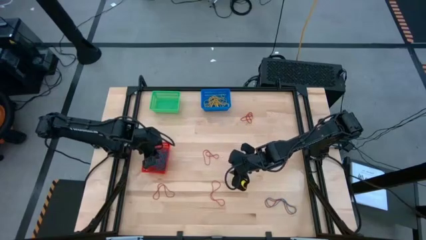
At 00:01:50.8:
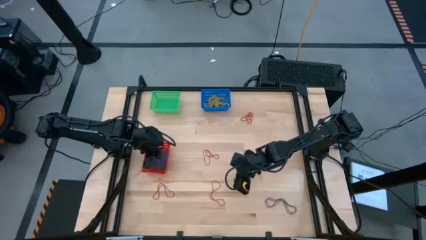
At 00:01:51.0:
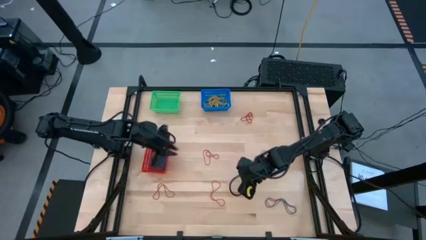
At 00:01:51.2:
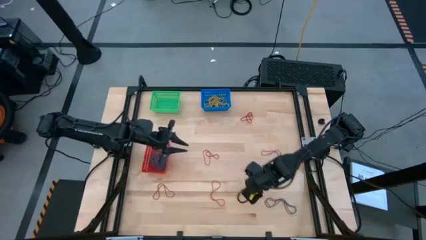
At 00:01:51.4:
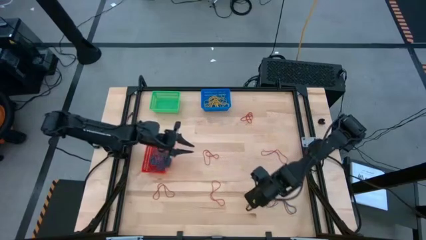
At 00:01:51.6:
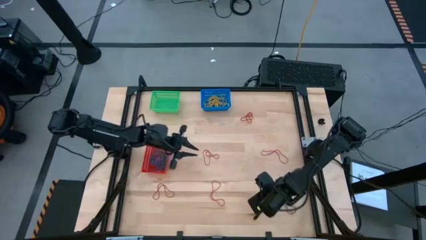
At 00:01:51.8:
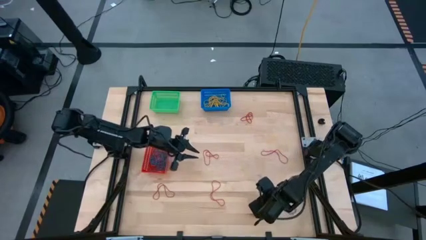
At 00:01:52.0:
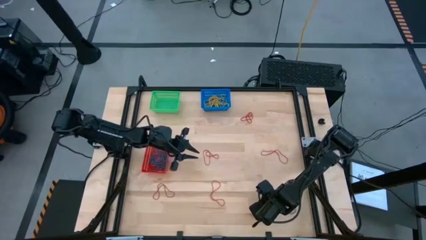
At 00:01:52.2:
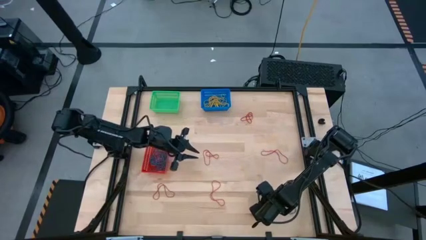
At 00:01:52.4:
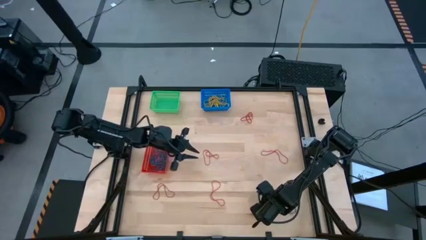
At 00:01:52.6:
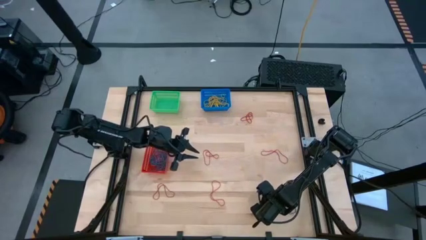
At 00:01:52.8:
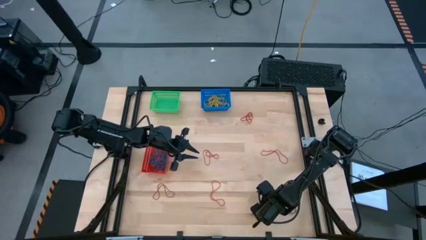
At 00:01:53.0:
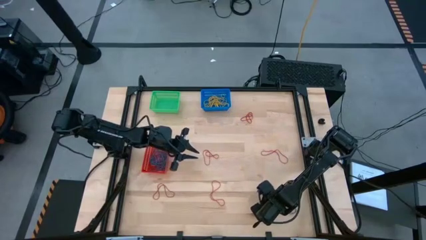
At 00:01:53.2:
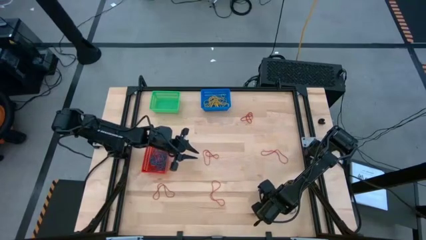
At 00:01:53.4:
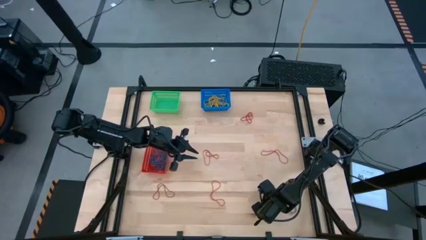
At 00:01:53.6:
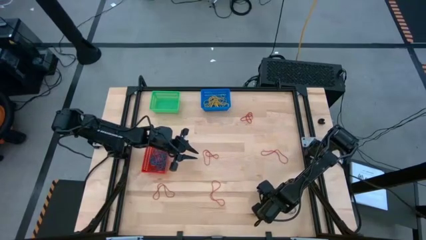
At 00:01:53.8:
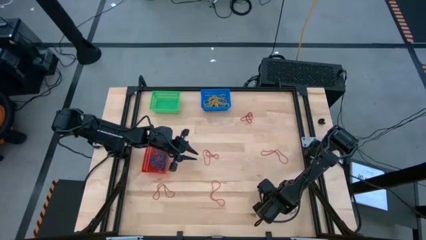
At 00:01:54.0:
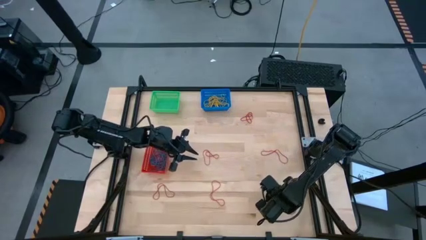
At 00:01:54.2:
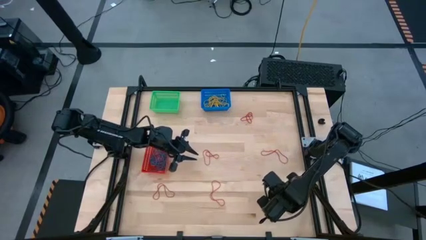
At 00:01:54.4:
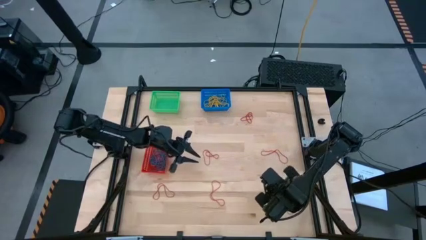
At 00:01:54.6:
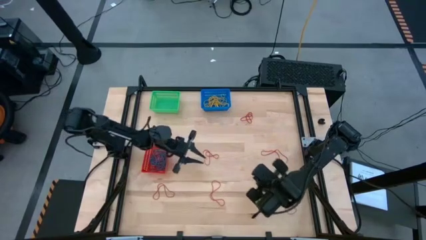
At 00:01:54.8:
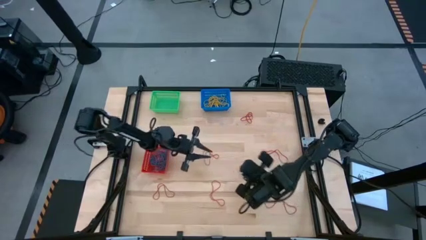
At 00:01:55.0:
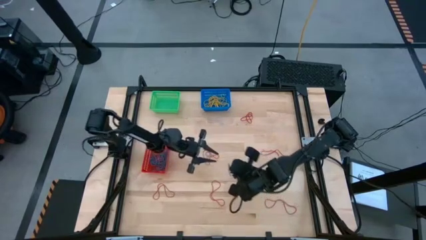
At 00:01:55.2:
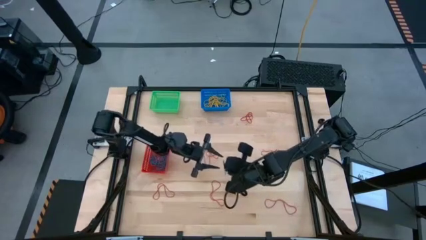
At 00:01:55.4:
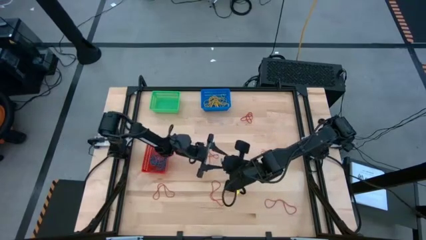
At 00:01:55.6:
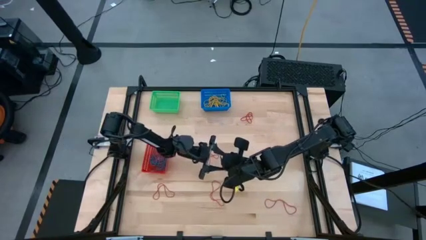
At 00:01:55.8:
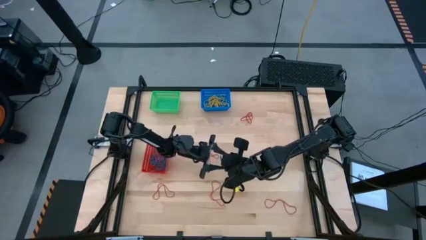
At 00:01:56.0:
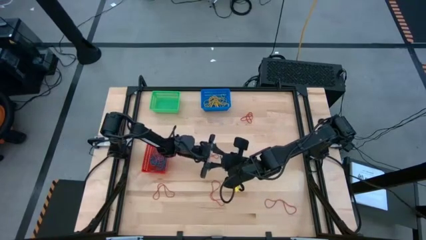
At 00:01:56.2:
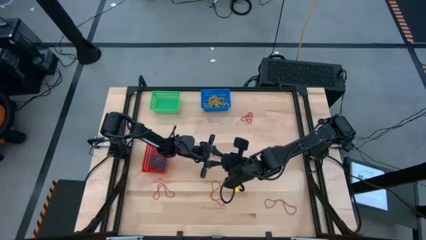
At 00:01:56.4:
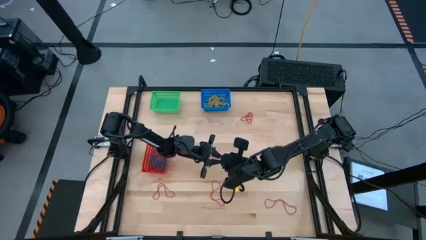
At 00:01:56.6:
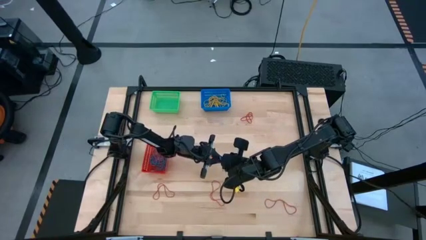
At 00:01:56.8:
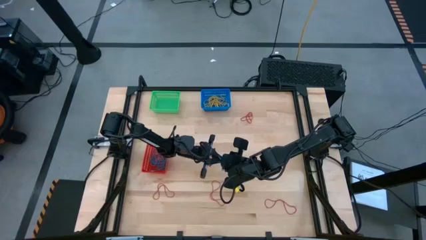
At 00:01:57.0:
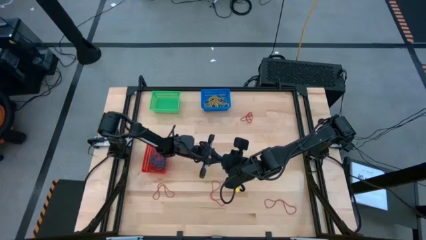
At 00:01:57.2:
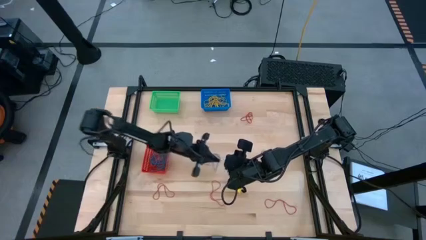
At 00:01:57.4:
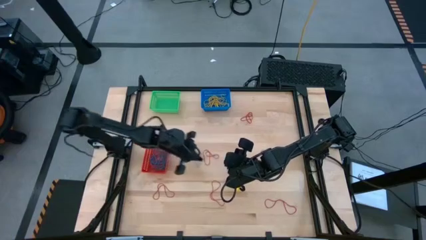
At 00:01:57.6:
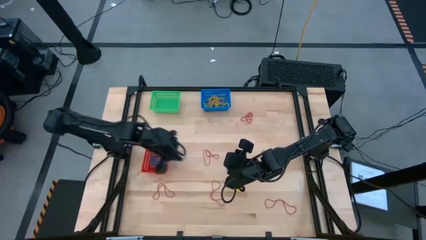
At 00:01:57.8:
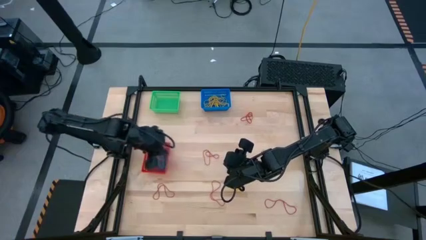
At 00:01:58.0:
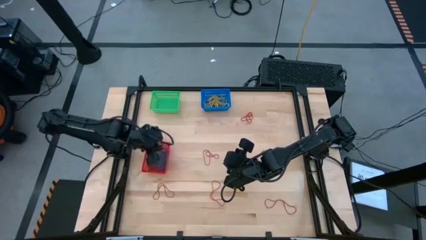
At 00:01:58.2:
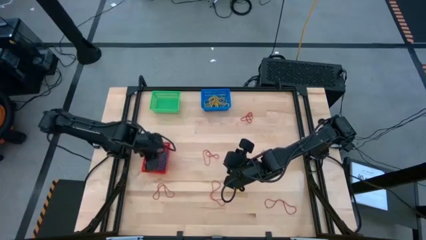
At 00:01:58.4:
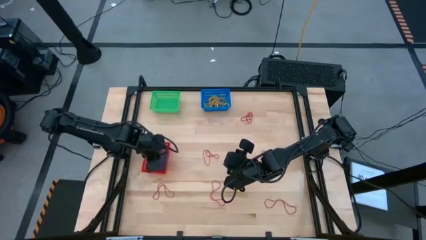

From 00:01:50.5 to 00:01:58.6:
Task: Sort rubber bands into baskets
Put the blue rubber band into the red bin

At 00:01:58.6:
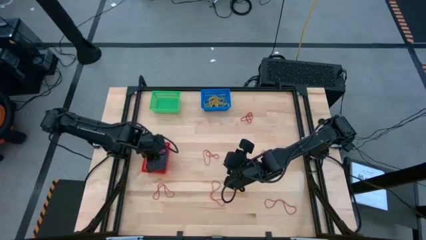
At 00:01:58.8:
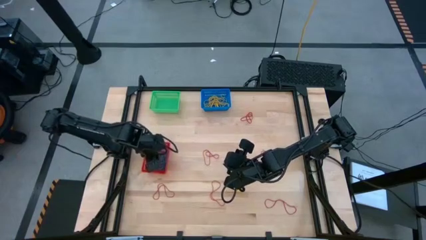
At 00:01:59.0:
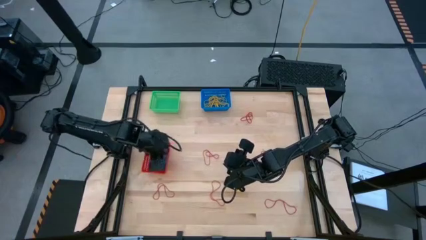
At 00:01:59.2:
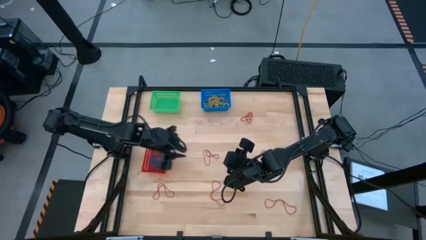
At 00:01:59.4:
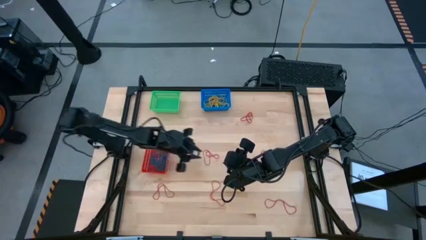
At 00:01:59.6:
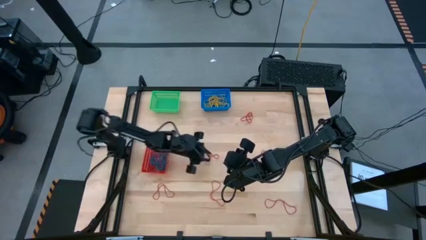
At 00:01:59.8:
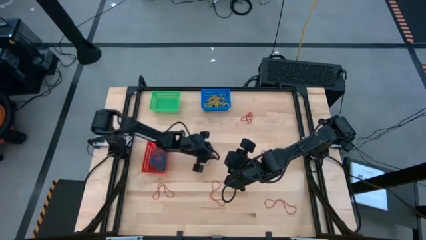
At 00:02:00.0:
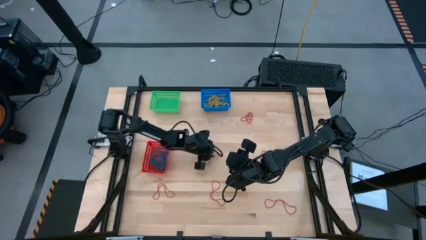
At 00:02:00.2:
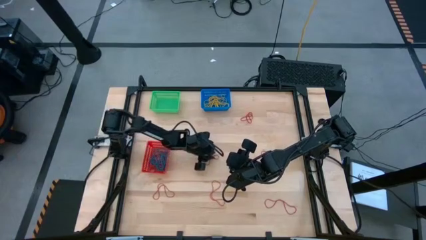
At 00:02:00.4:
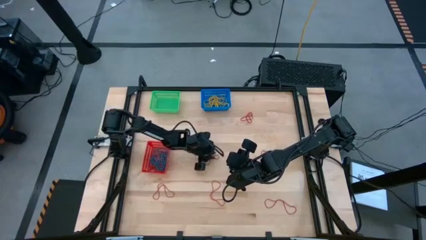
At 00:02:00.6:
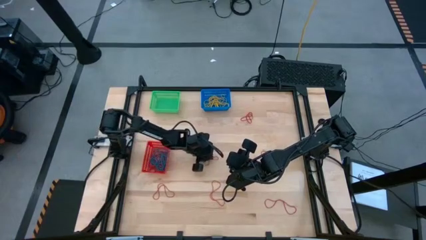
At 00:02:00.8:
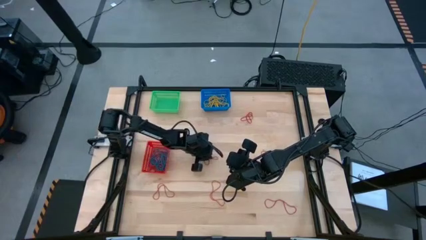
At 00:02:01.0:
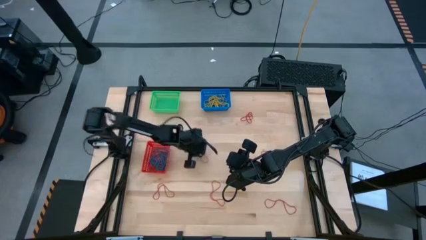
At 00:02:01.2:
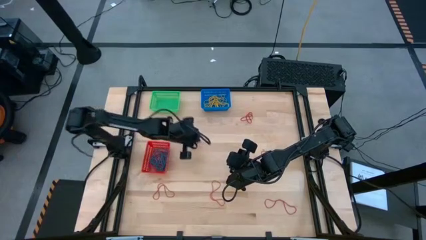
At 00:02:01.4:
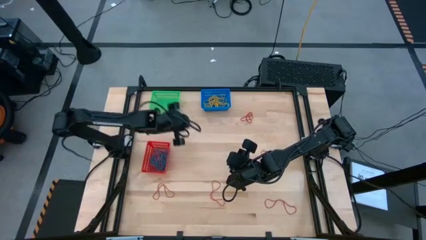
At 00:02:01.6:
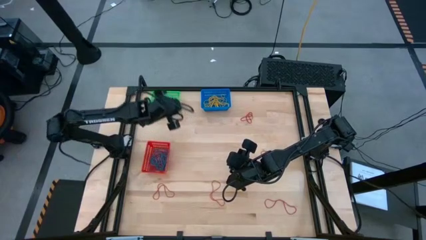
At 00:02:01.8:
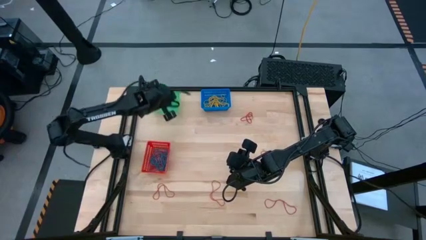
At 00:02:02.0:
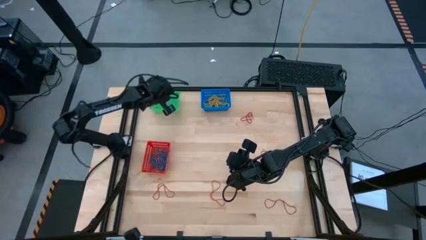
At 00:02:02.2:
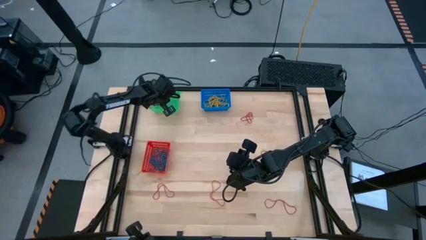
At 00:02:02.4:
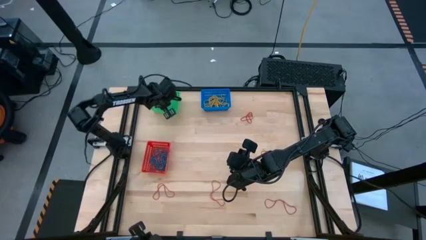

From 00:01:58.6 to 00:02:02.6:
Put the red rubber band into the green bin

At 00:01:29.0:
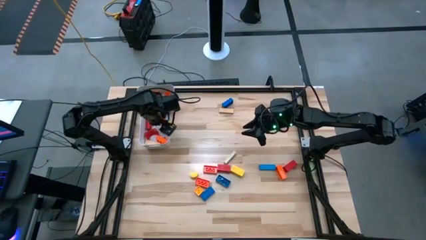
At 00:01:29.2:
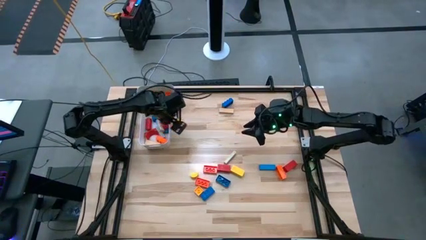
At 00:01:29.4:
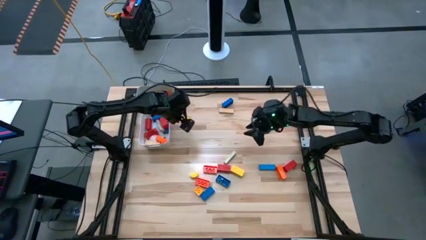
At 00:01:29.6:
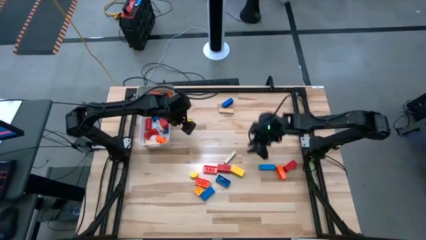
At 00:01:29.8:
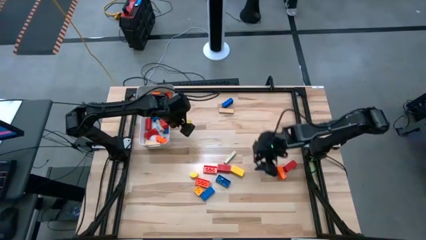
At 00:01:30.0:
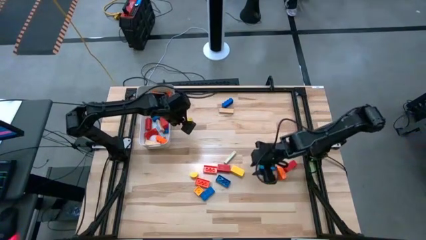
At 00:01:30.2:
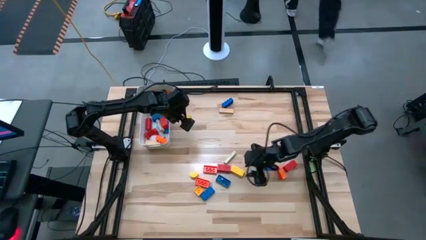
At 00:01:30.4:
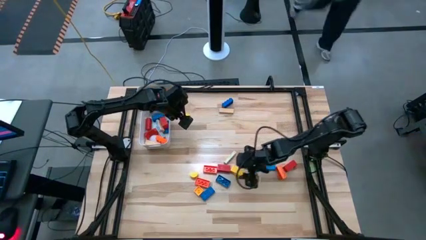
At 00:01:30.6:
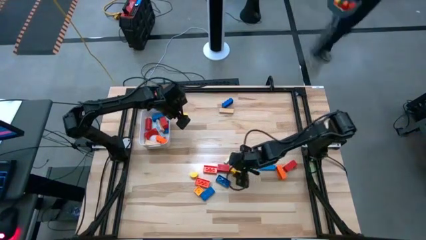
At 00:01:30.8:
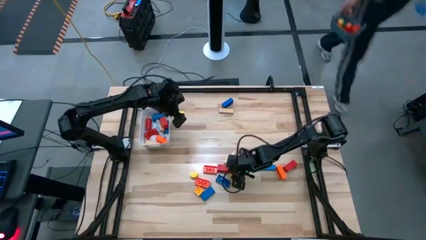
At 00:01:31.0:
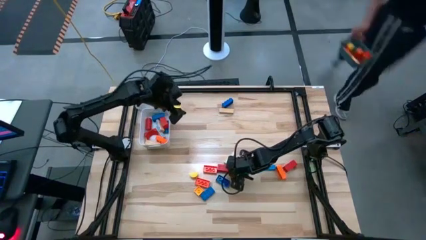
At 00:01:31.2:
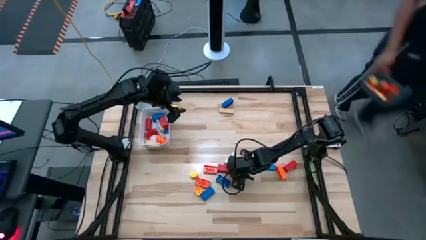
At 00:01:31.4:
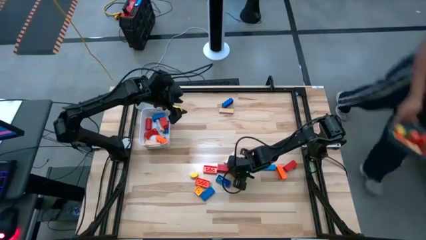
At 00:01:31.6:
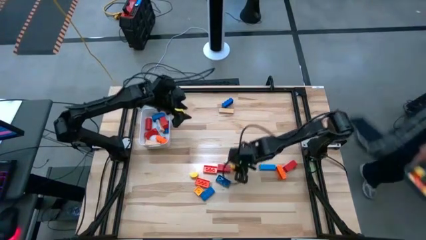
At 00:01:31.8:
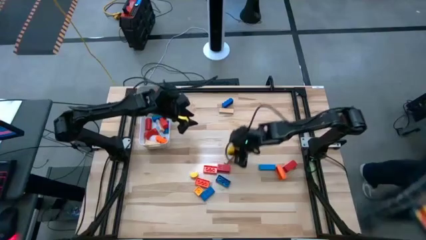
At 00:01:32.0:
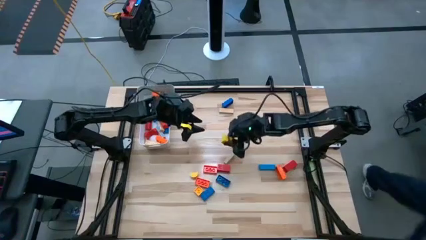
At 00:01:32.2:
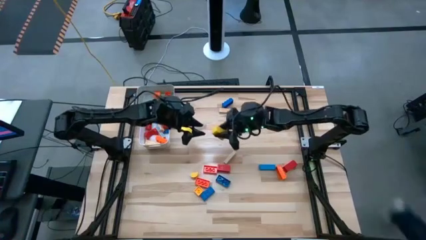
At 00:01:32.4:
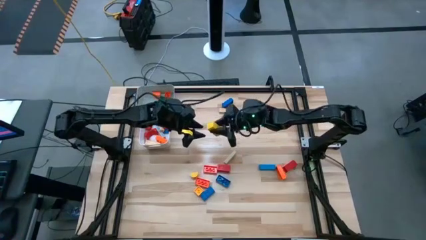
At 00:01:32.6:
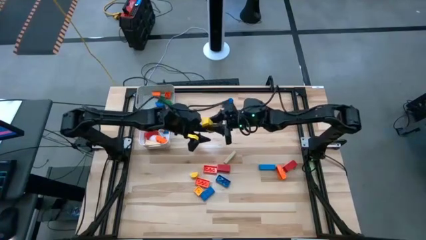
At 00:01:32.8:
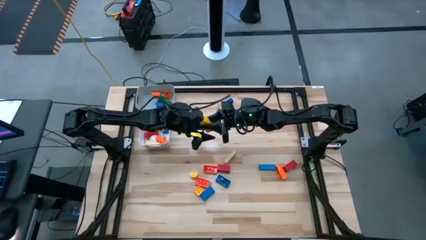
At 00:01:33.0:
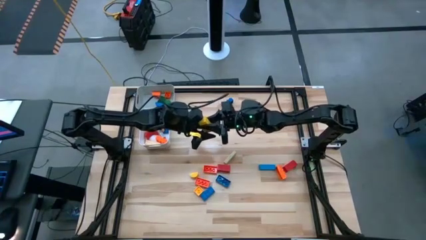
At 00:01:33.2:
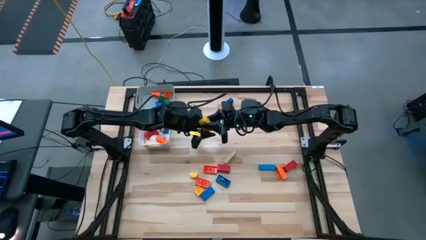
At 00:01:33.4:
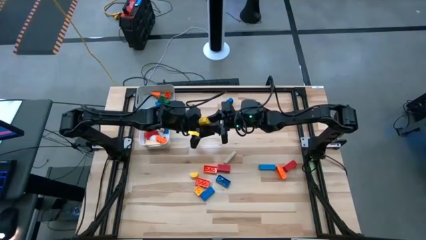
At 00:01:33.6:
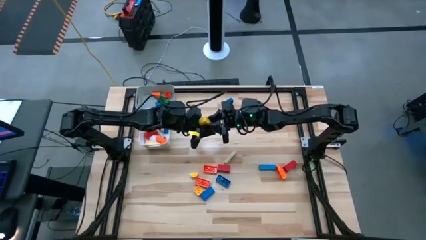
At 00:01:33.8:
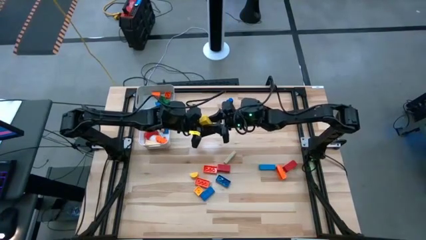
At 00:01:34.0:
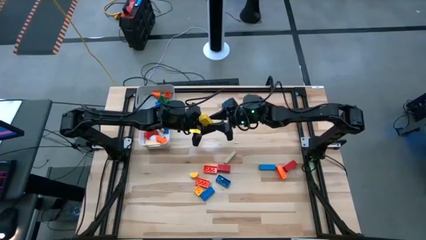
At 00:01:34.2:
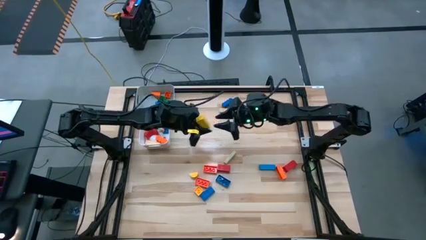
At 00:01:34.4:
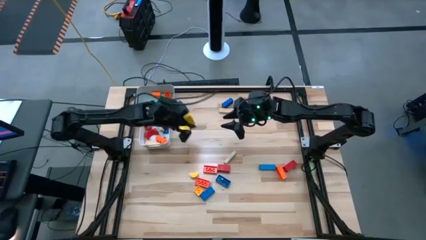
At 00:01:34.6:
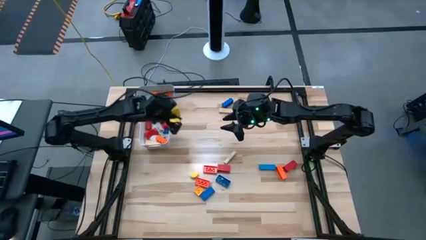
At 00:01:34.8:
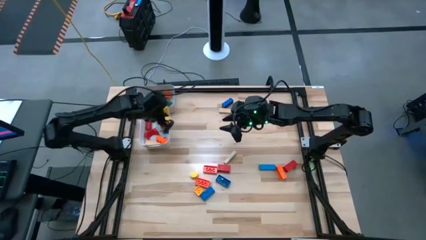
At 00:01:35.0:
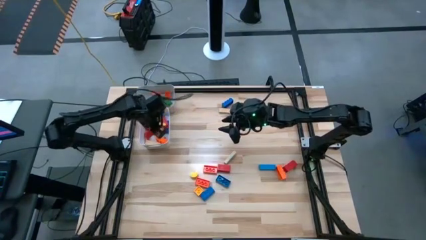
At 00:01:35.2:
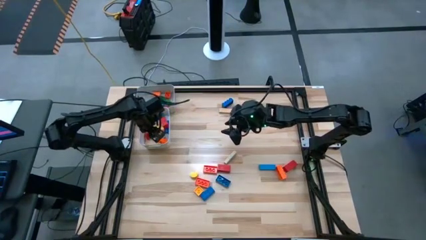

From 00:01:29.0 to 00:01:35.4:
Task: Sort blocks by size
Put the large yellow wooden block into the white bin
